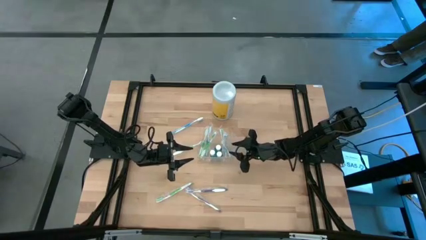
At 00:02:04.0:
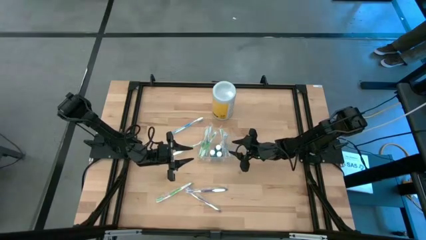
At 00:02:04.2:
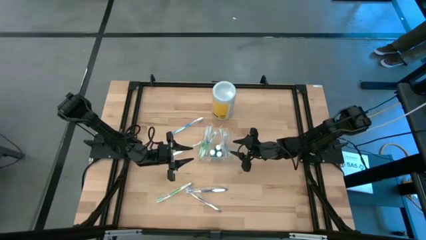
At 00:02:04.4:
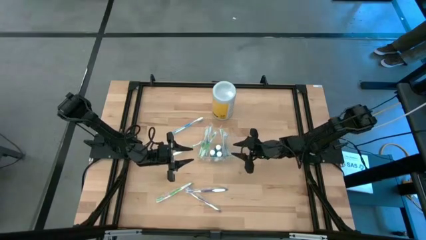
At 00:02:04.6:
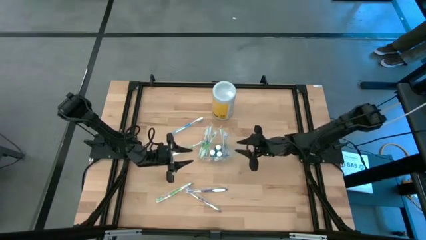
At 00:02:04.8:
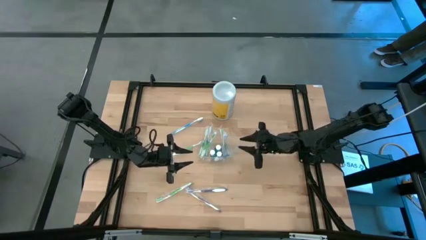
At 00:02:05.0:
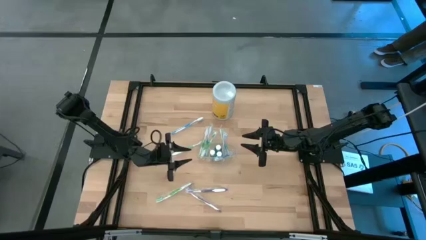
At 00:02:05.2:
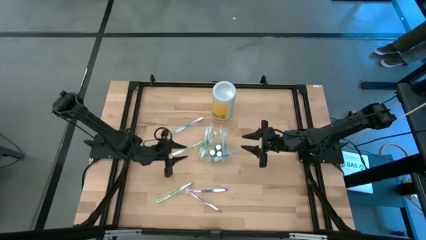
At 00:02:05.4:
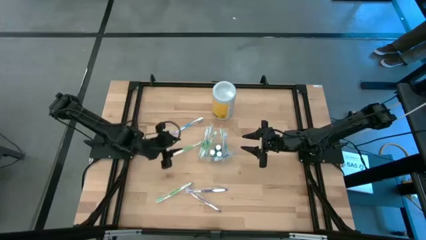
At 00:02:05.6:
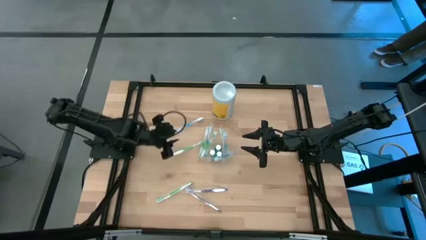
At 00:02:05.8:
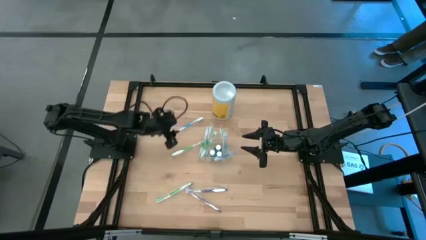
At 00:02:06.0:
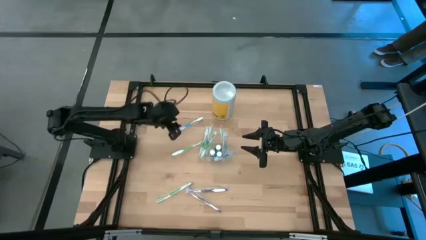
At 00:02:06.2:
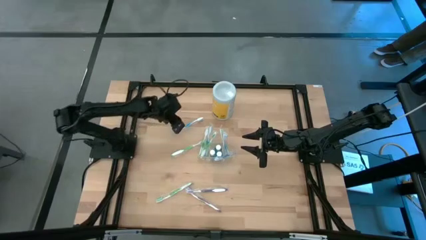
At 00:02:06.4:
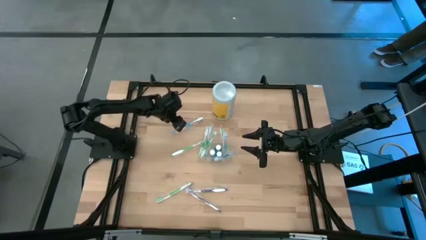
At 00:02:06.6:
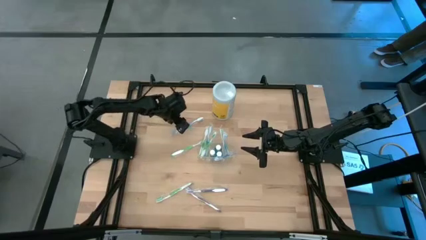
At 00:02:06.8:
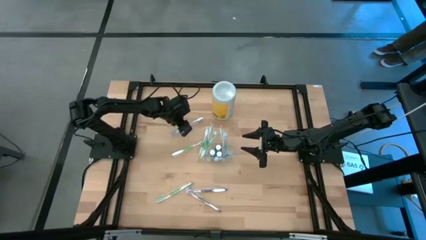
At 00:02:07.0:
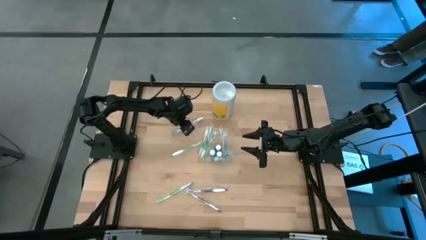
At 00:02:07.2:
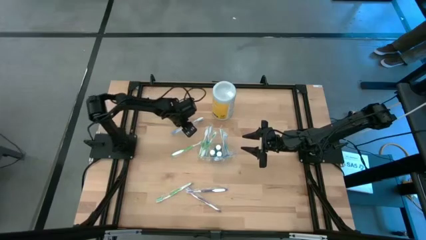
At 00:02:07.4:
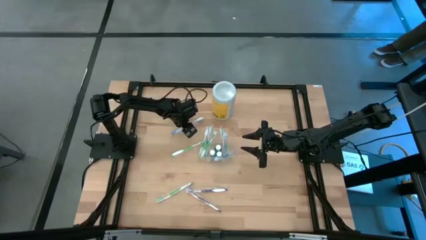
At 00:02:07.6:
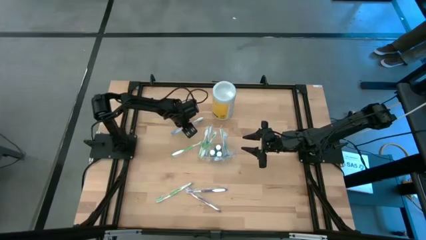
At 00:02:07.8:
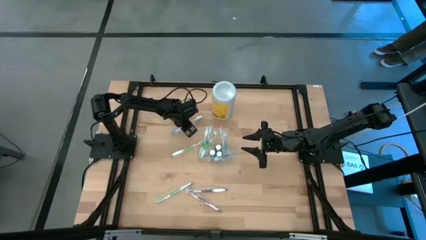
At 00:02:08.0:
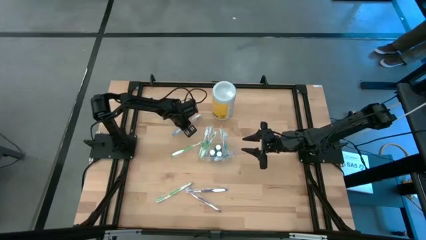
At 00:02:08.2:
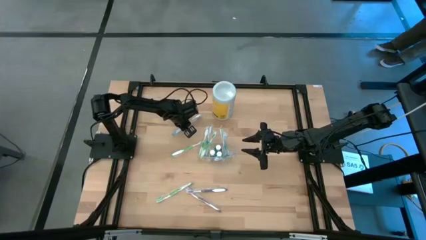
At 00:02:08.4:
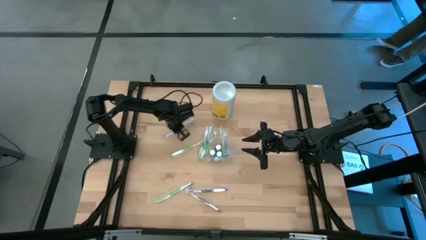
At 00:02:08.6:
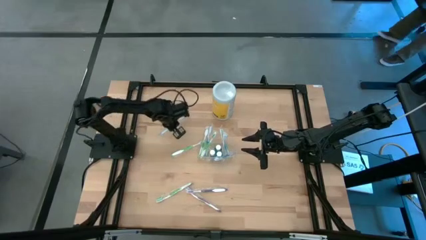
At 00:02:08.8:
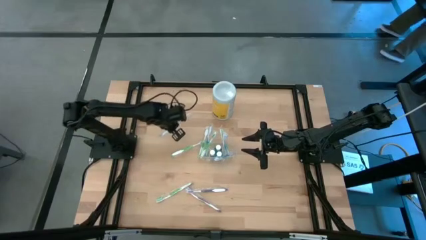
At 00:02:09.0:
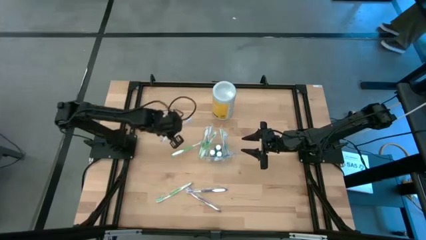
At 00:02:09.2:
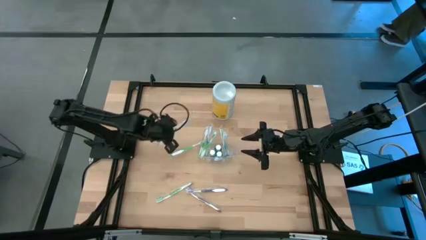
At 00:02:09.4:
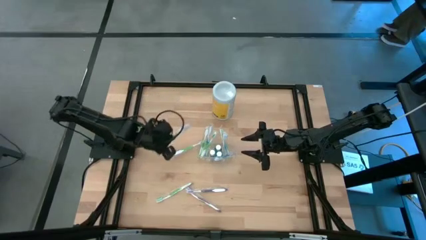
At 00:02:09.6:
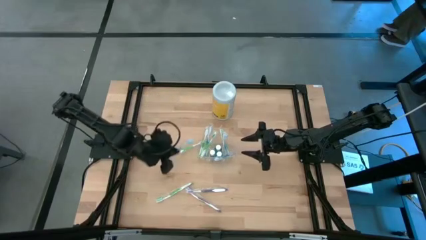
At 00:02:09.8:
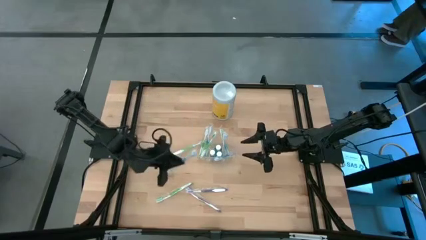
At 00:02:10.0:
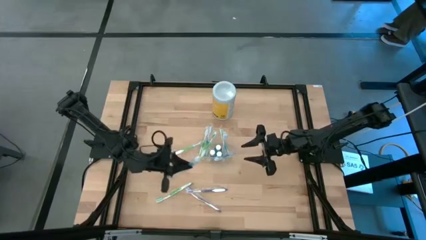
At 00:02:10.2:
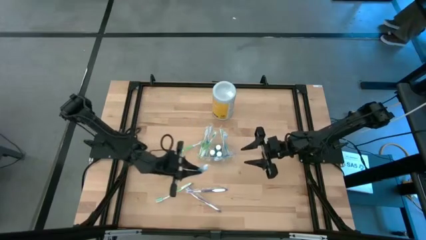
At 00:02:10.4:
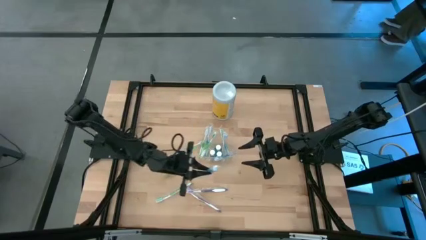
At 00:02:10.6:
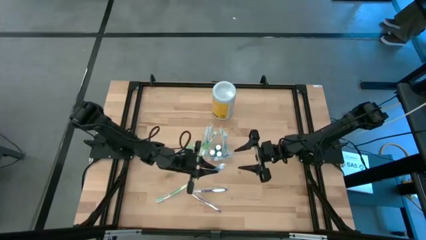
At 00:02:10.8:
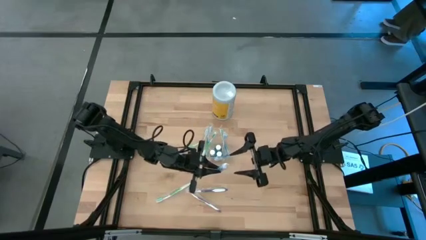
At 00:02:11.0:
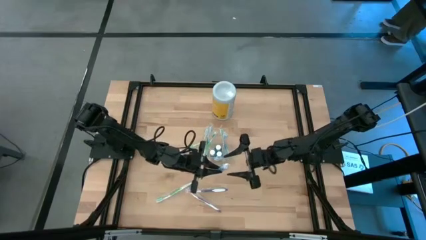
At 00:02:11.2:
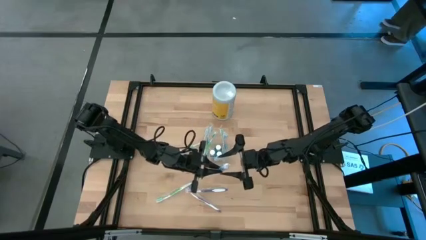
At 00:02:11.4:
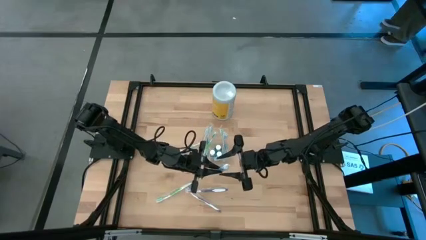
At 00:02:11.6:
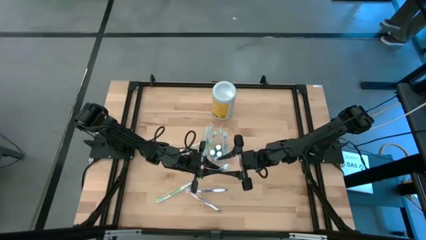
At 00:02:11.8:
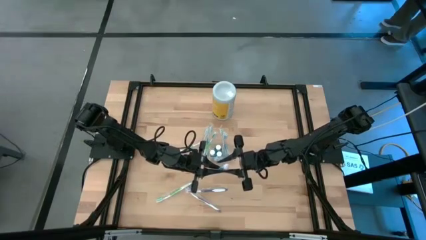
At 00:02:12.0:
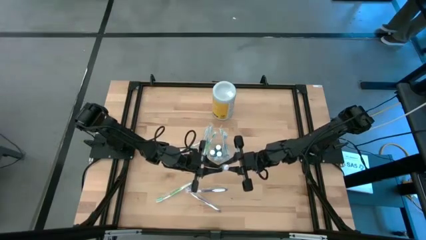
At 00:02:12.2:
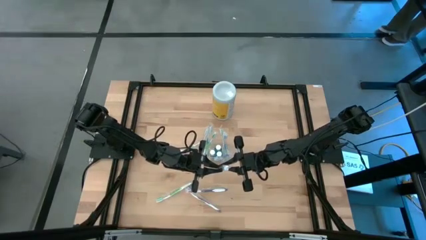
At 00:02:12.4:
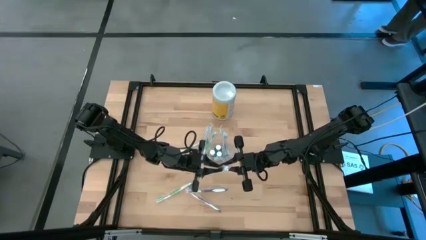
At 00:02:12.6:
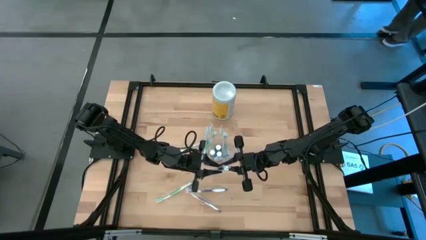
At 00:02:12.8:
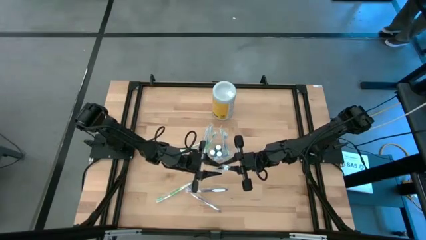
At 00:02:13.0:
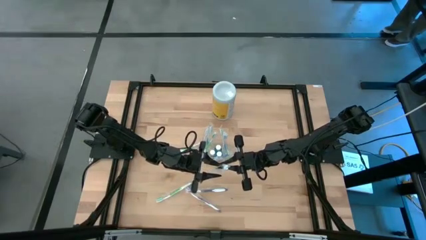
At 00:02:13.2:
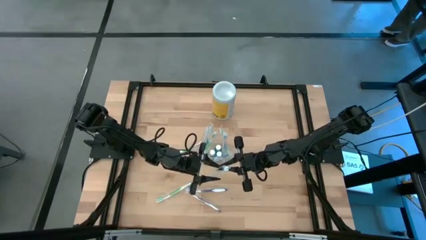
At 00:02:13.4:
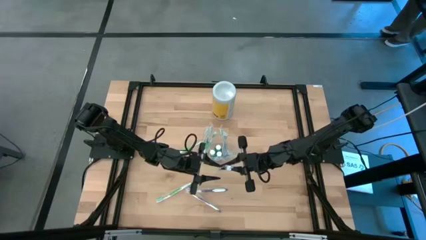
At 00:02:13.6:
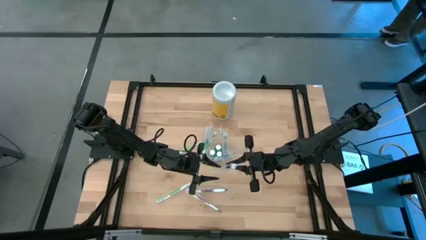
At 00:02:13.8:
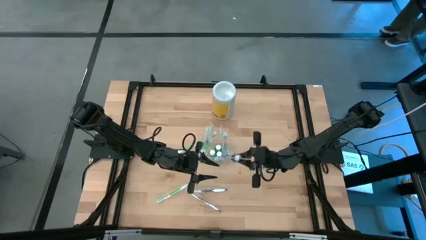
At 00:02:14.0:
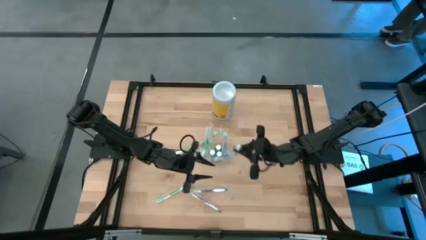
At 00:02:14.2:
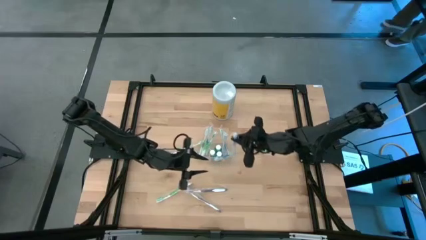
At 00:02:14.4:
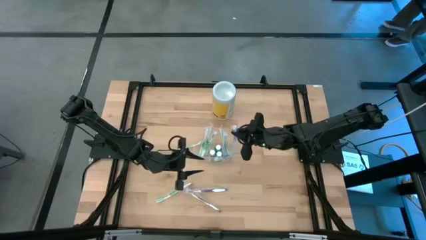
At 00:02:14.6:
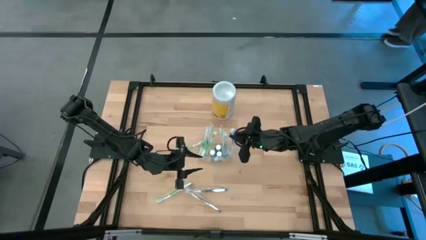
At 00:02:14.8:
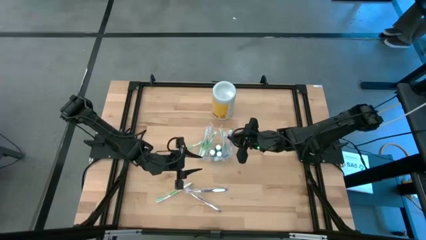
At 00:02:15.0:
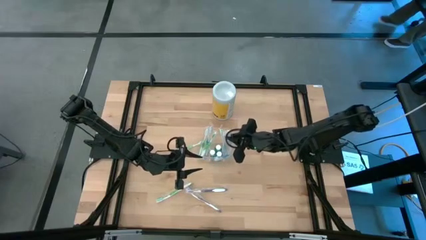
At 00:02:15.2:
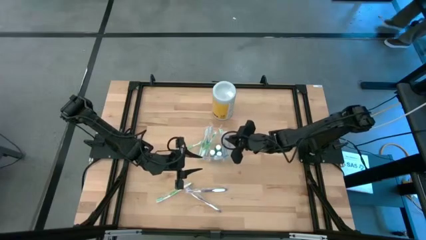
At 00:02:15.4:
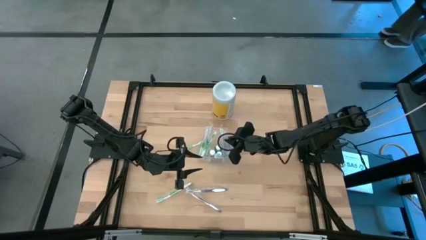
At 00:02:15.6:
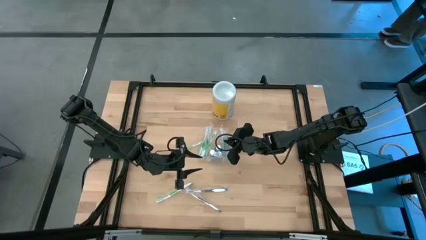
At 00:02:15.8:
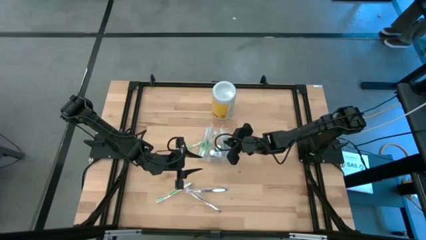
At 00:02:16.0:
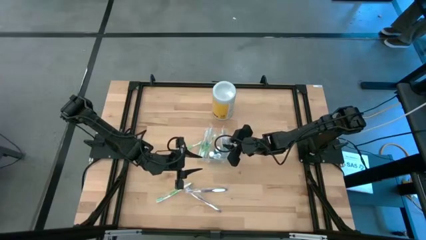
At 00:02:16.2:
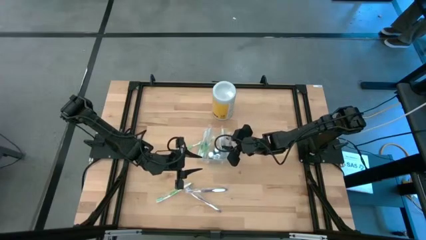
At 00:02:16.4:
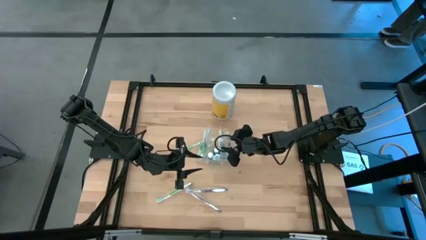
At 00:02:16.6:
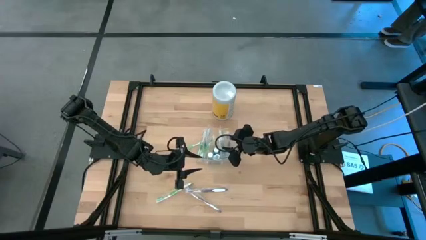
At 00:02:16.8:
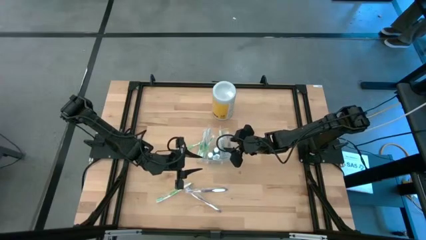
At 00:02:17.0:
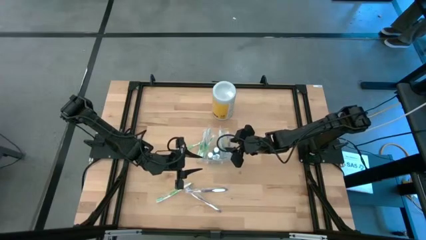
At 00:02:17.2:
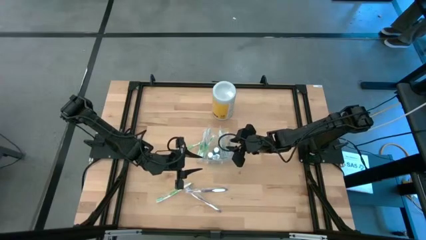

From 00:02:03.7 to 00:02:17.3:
Task: Pick & Place toothbrushing station
Put the blue toothbrush into the transparent organizer
